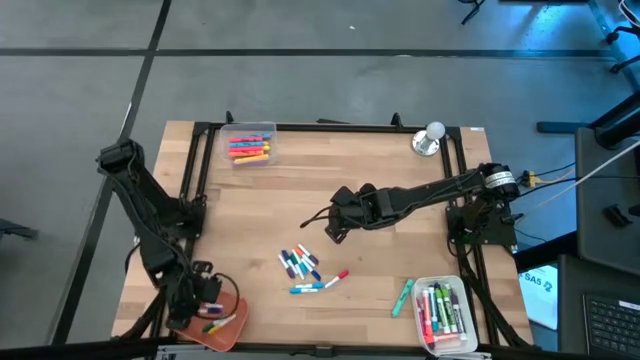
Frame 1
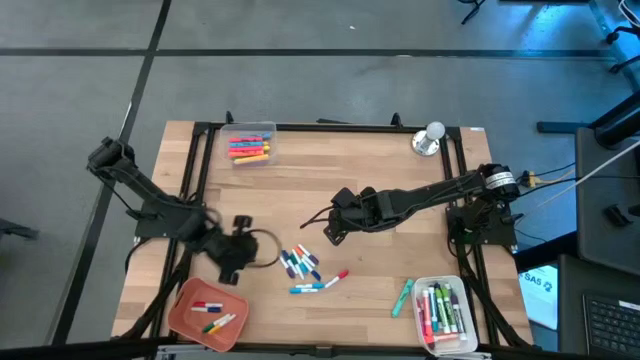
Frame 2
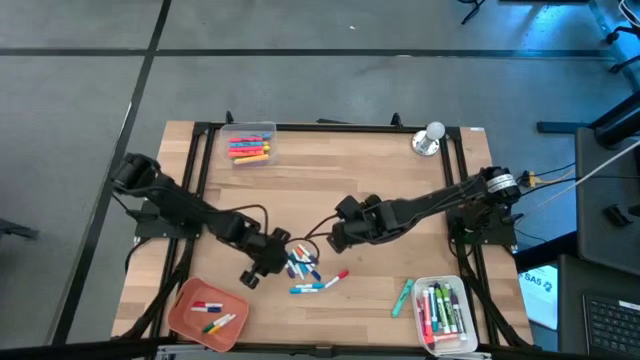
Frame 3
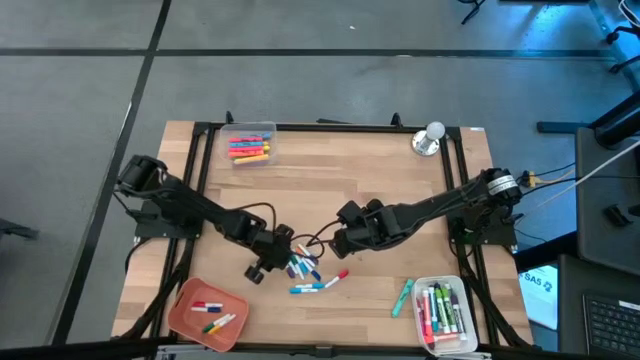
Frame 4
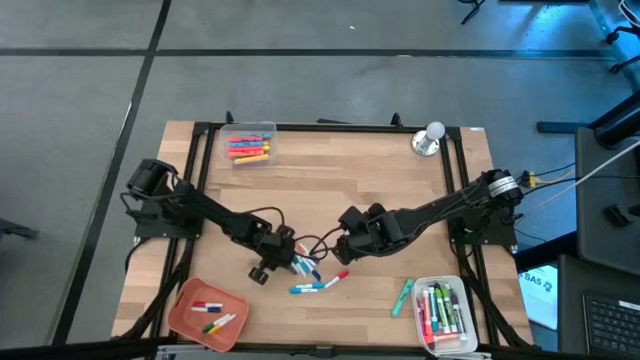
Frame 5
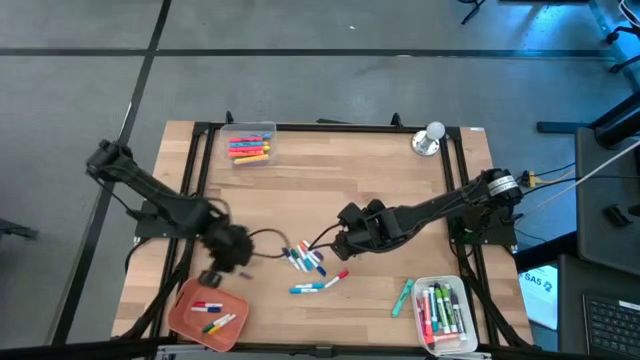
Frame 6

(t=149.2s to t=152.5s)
Task: Pick & Place Markers
Put the blue pen into the orange bin

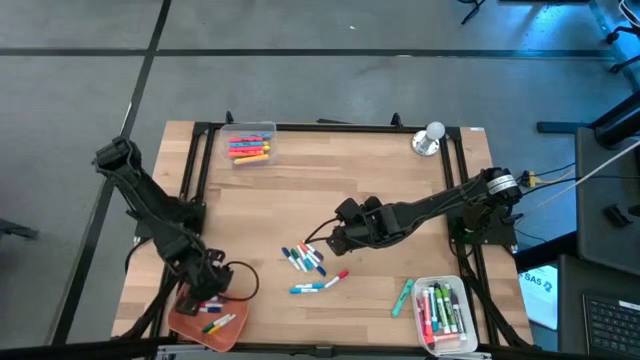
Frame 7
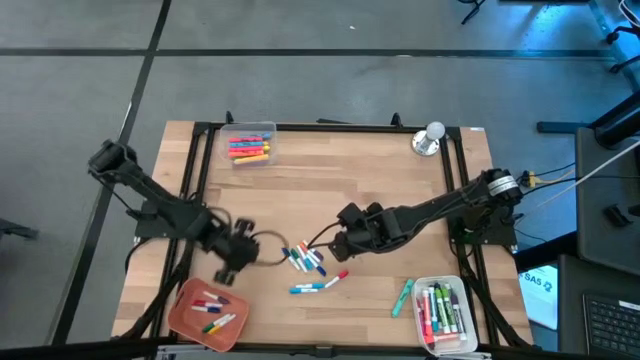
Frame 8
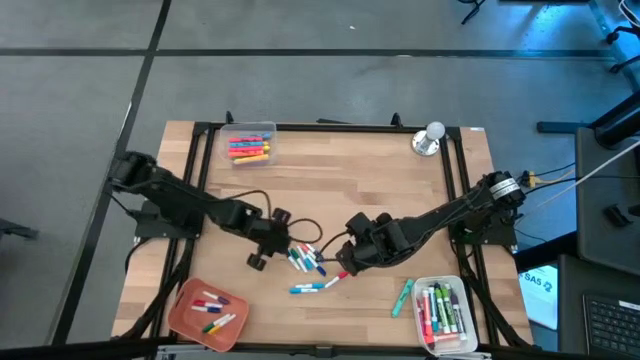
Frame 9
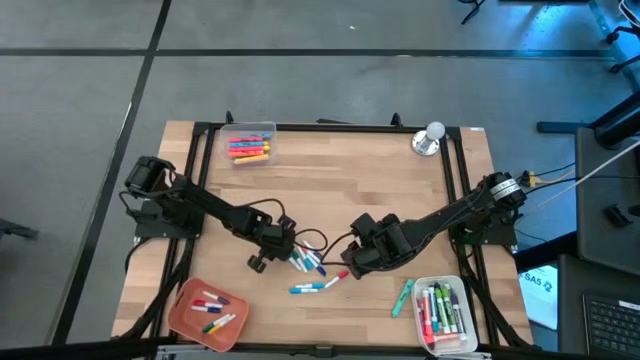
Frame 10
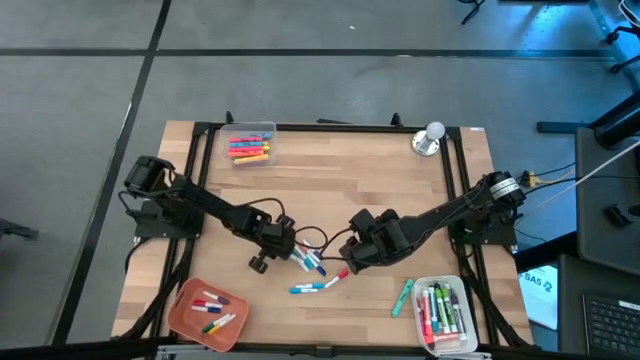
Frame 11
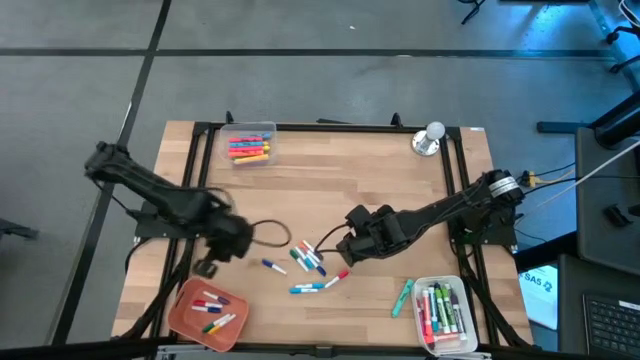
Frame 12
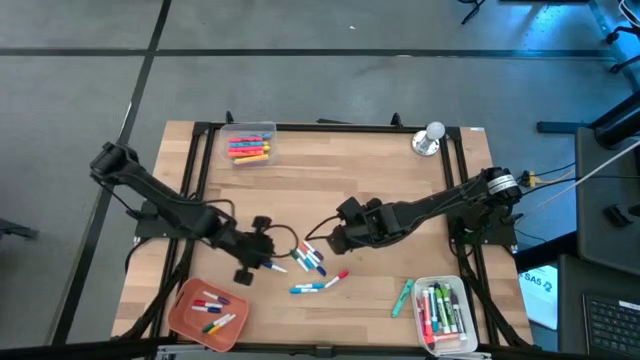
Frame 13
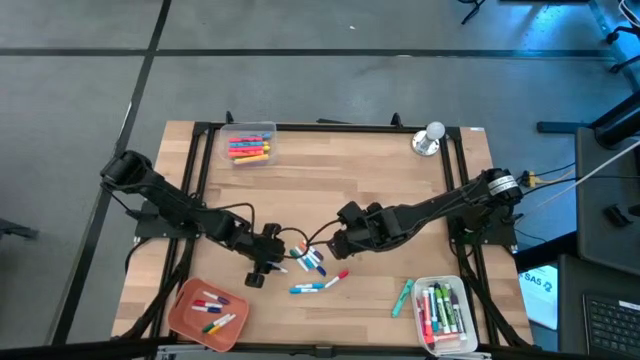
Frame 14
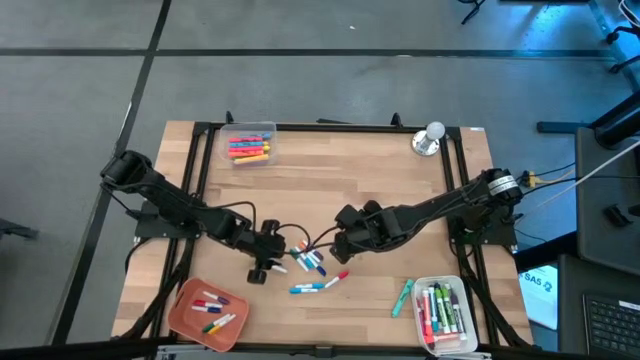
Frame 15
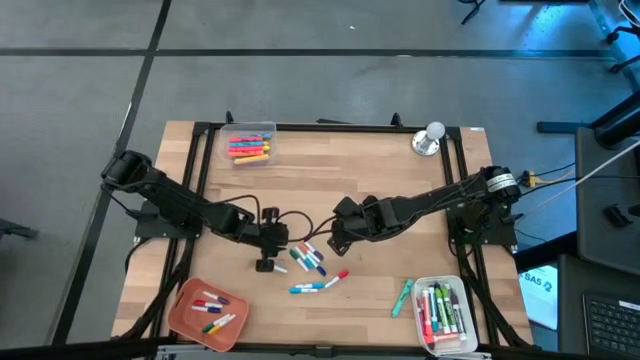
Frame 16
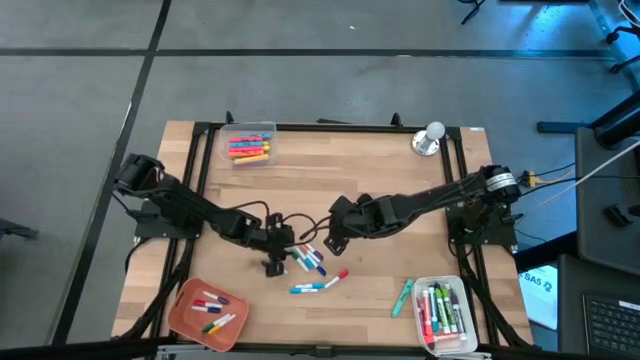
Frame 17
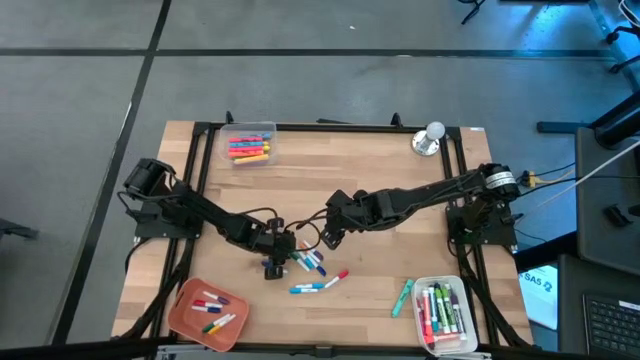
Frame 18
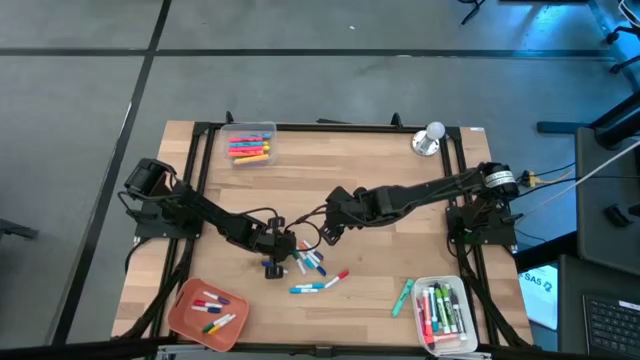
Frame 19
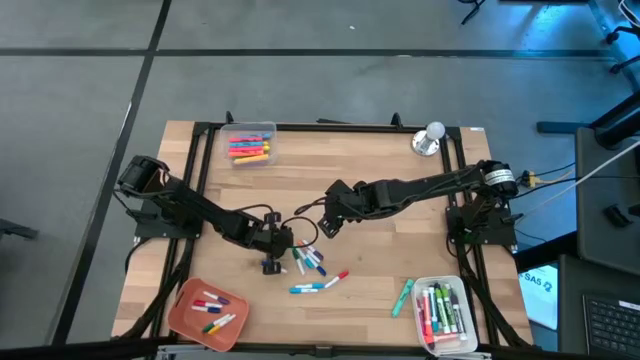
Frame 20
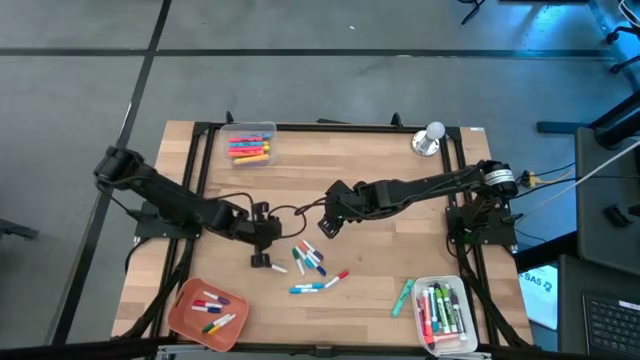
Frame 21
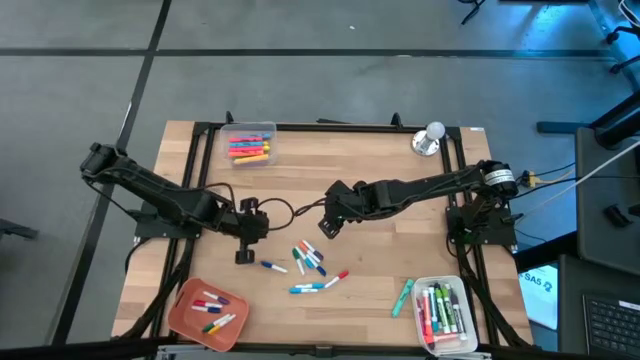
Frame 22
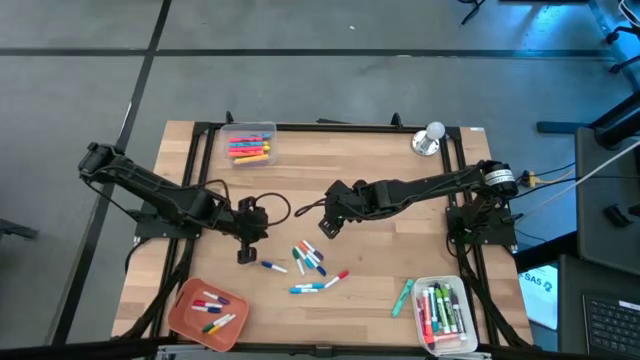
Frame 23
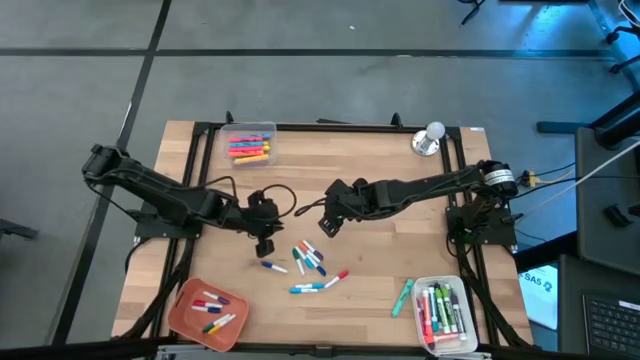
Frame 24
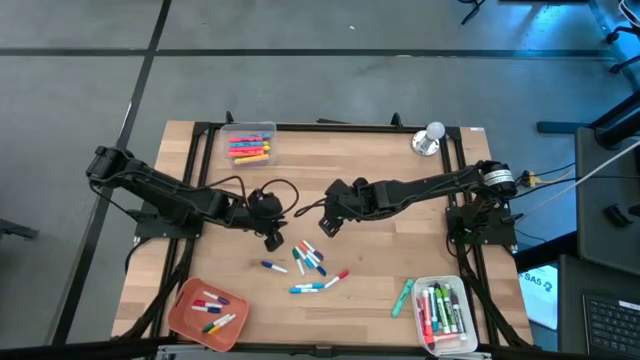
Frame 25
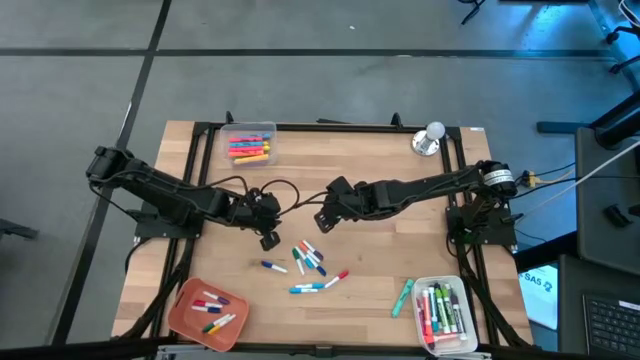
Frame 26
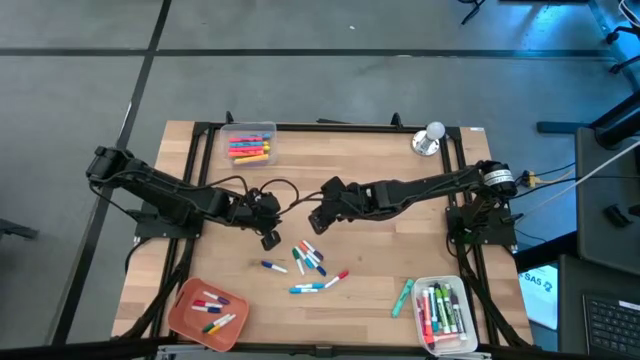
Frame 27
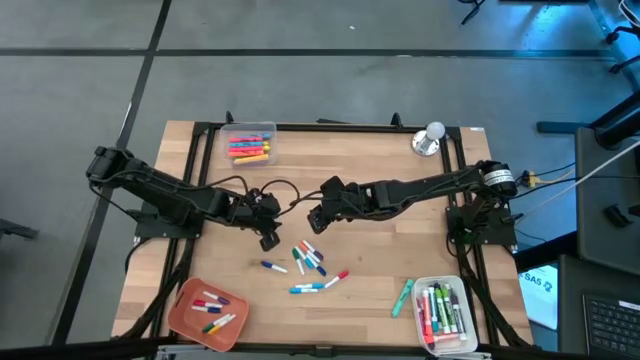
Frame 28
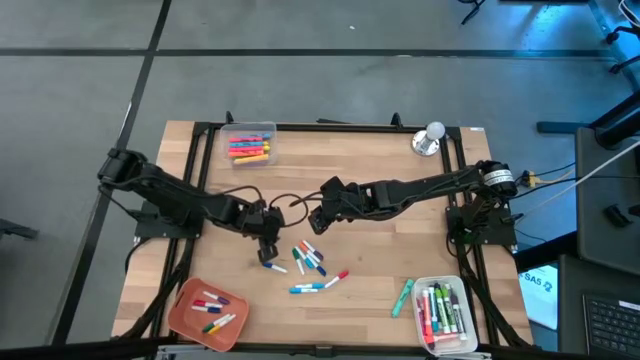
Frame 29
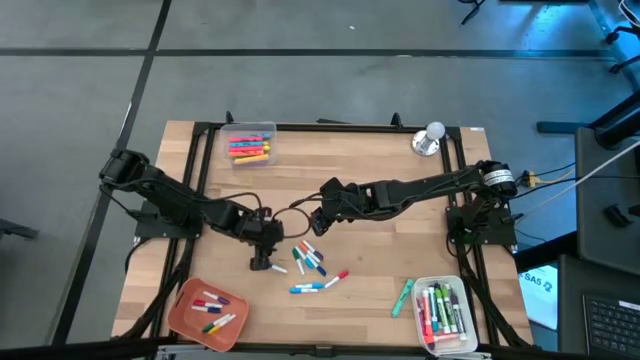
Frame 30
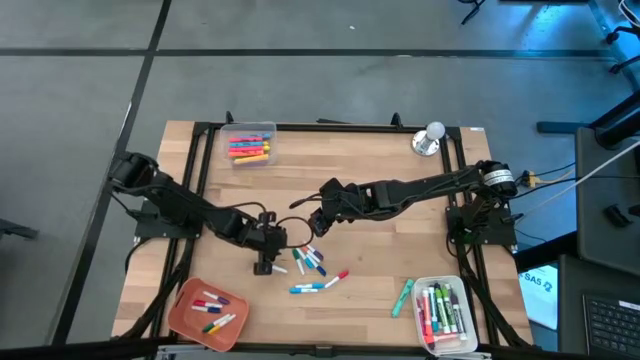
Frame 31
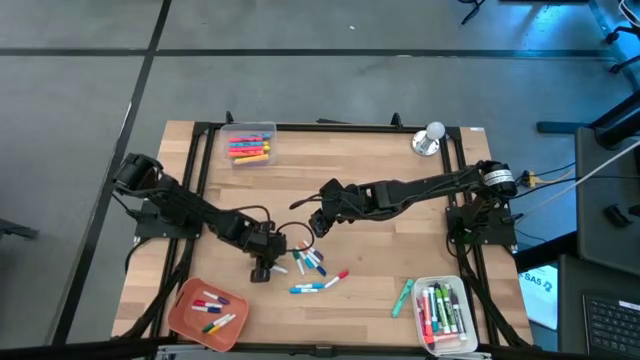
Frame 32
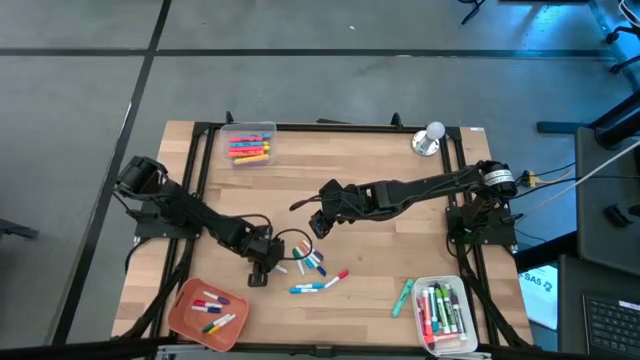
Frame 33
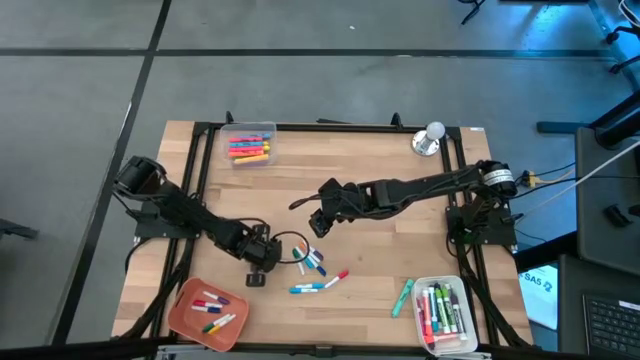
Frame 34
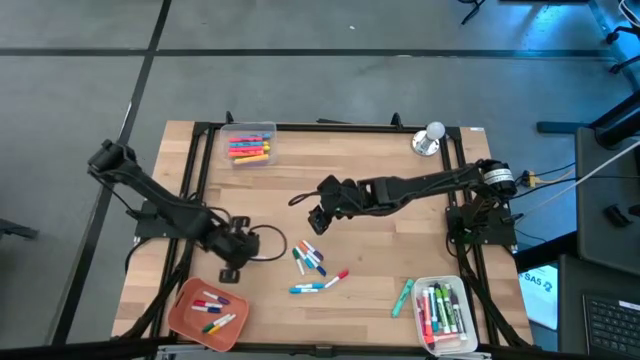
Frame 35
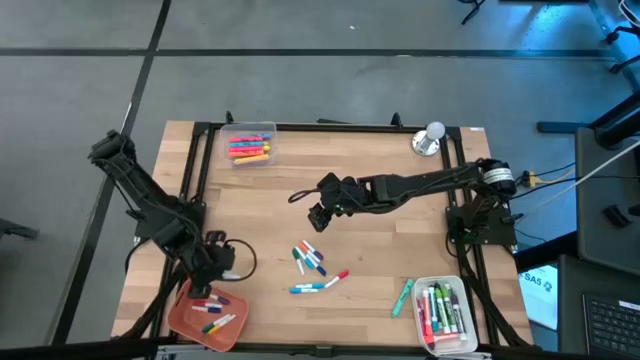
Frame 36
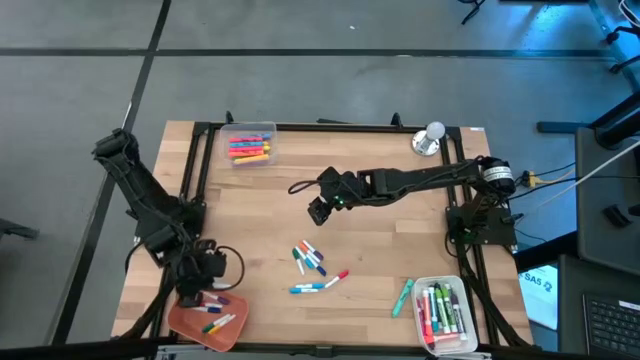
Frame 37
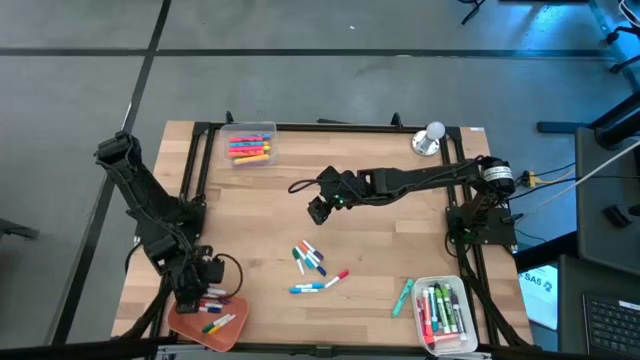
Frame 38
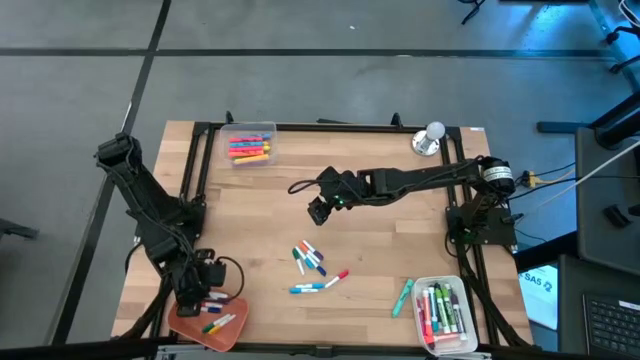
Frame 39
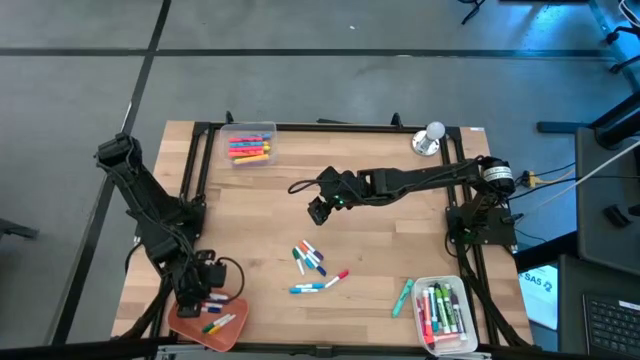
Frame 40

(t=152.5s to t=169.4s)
Put the blue pen into the orange bin

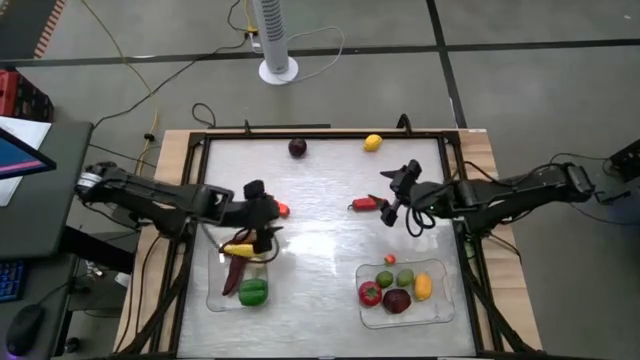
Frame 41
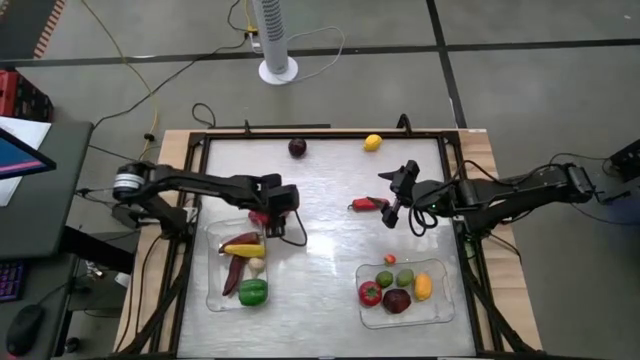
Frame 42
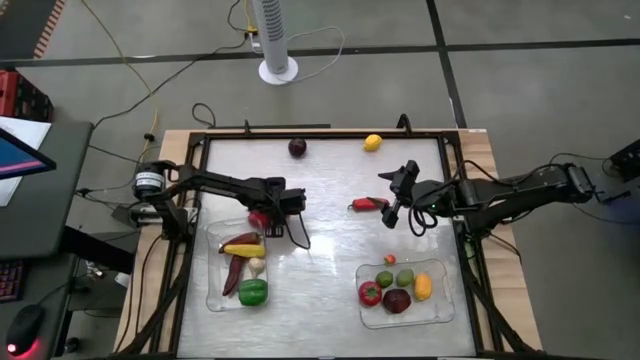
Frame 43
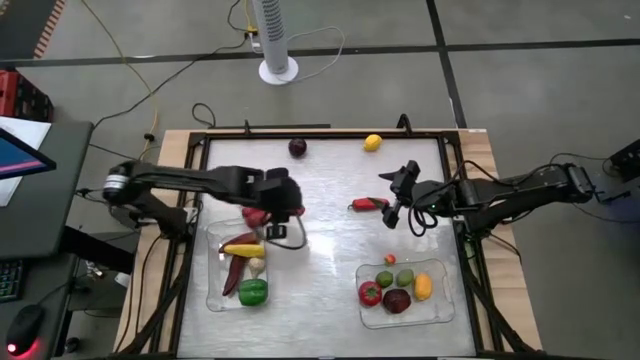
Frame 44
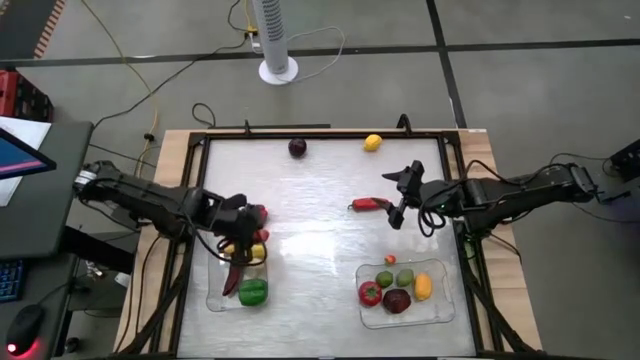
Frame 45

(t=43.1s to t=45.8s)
Task: Sort produce into baskets
Put the carrot into the left transparent bin
